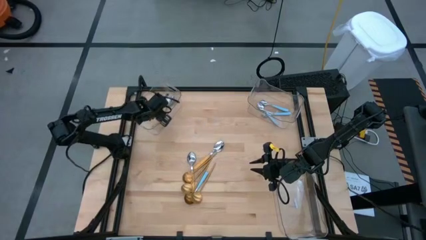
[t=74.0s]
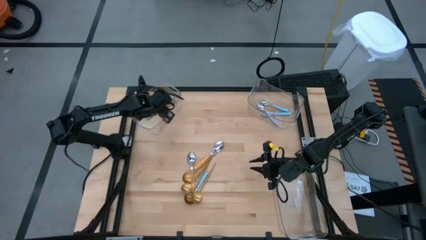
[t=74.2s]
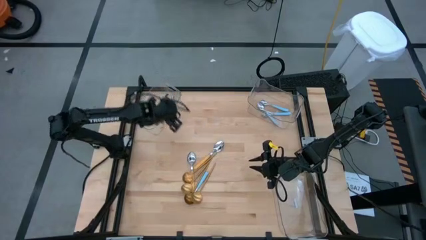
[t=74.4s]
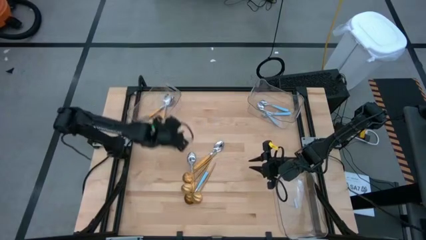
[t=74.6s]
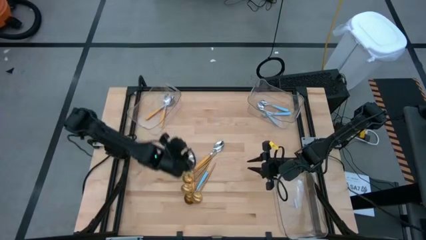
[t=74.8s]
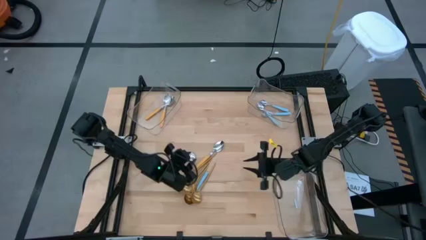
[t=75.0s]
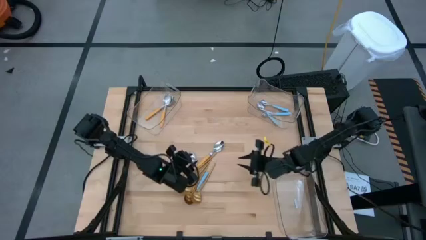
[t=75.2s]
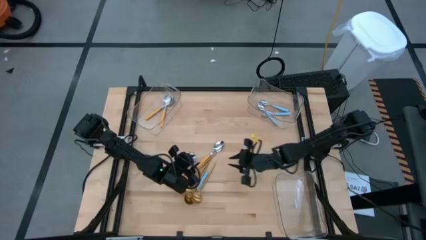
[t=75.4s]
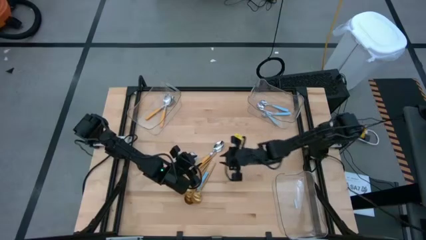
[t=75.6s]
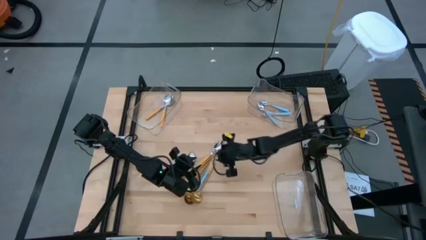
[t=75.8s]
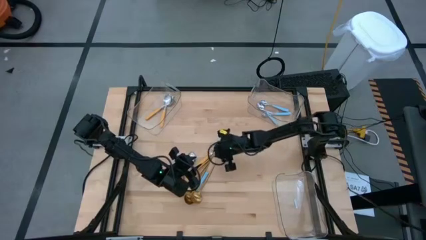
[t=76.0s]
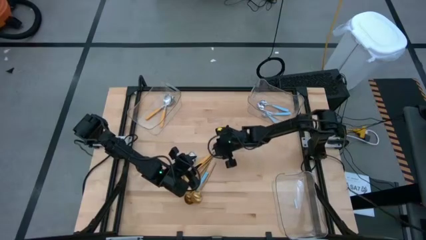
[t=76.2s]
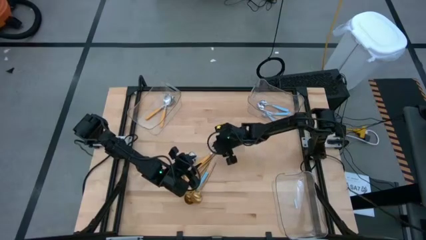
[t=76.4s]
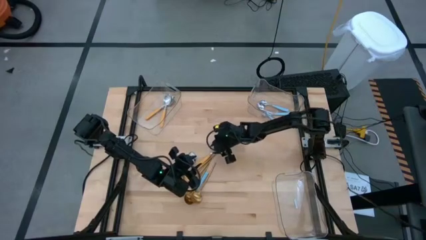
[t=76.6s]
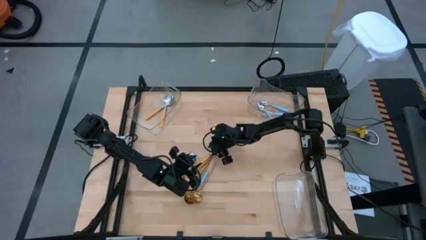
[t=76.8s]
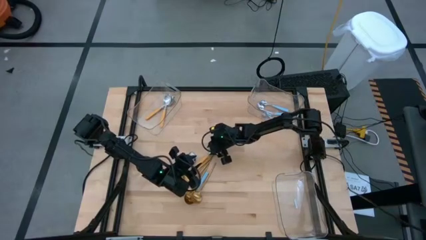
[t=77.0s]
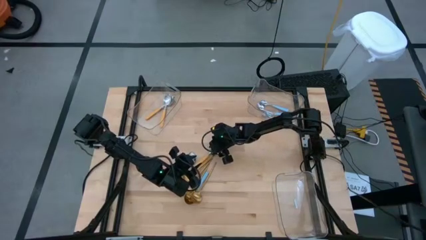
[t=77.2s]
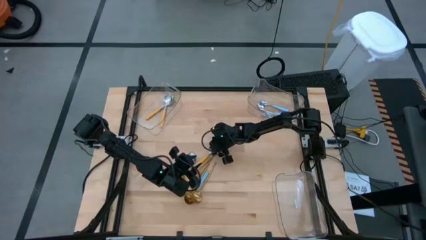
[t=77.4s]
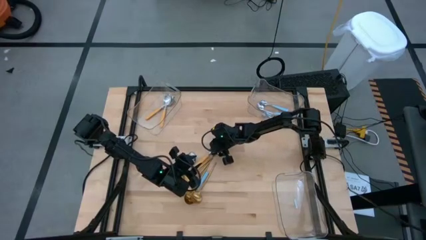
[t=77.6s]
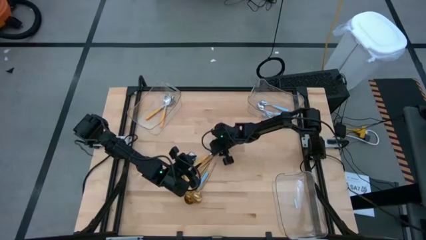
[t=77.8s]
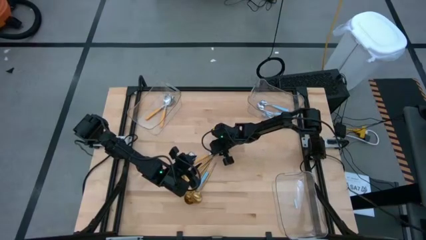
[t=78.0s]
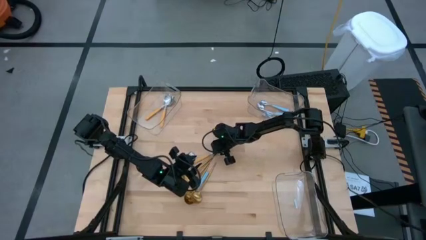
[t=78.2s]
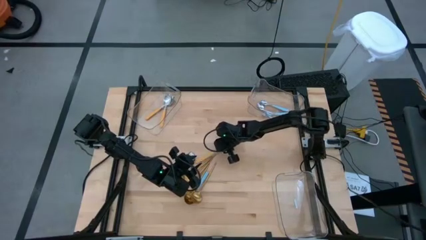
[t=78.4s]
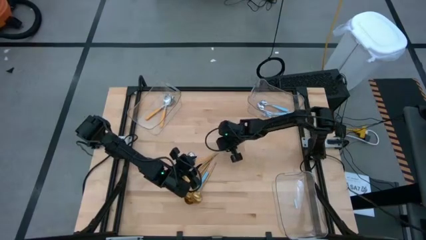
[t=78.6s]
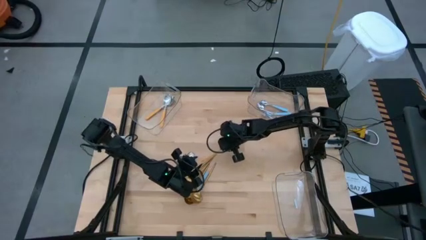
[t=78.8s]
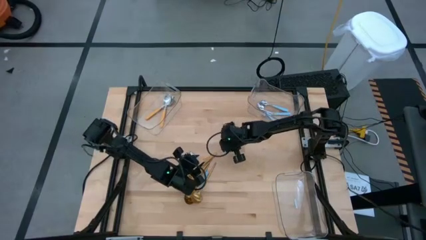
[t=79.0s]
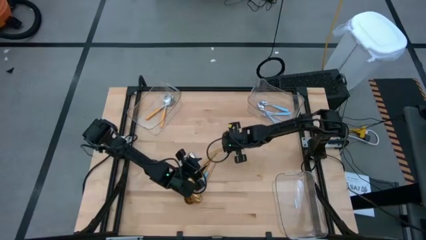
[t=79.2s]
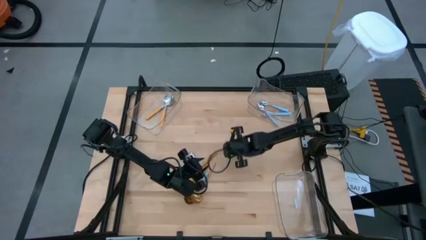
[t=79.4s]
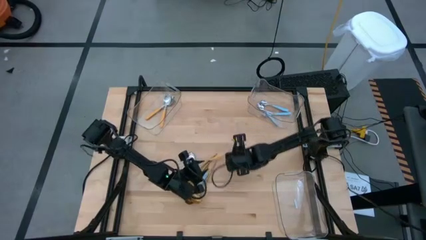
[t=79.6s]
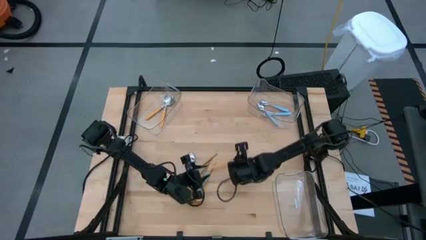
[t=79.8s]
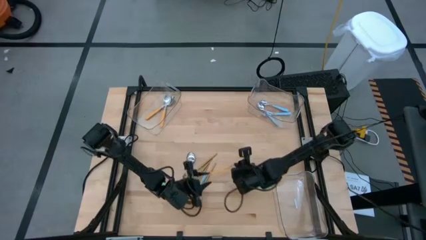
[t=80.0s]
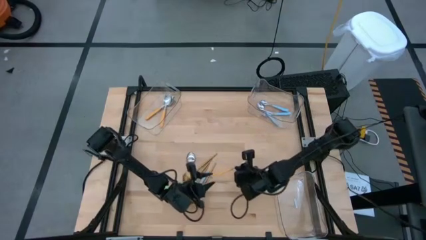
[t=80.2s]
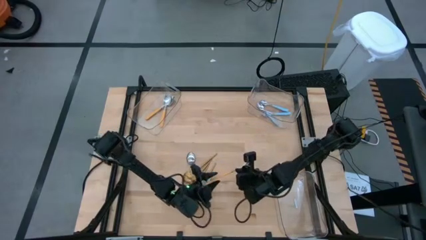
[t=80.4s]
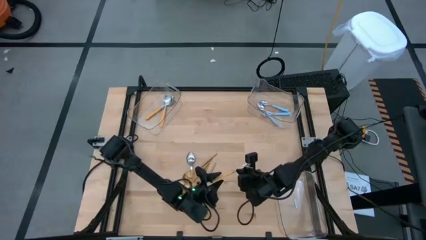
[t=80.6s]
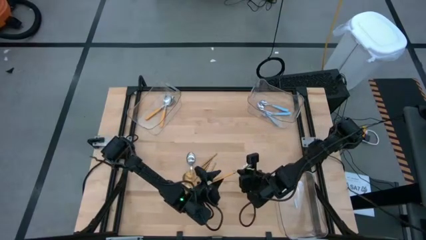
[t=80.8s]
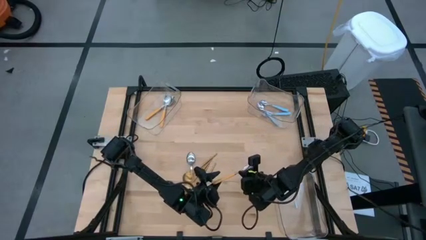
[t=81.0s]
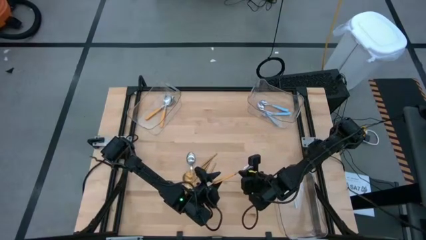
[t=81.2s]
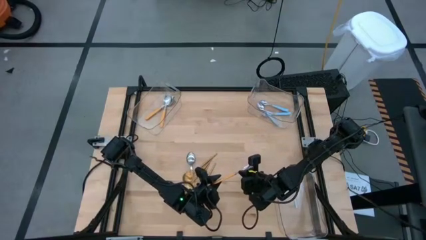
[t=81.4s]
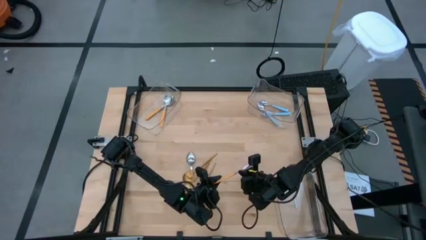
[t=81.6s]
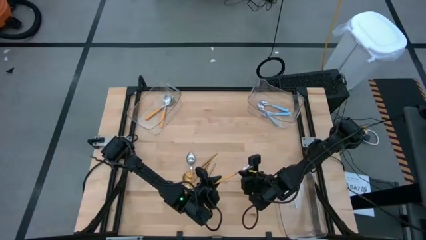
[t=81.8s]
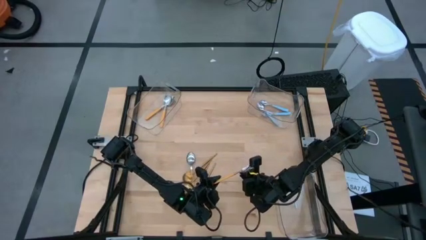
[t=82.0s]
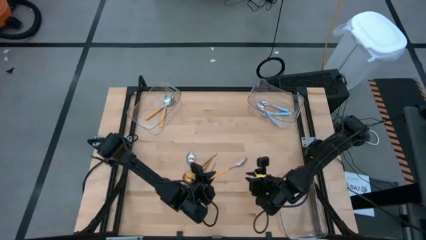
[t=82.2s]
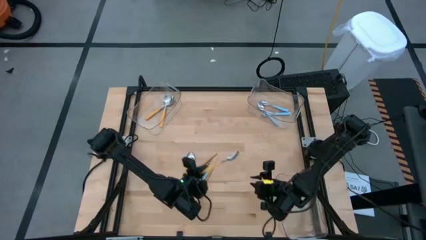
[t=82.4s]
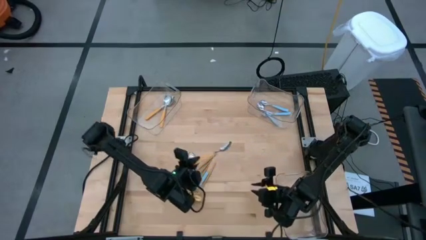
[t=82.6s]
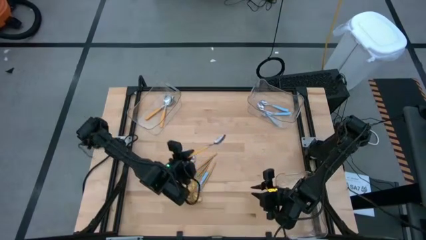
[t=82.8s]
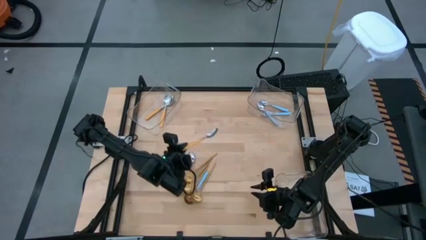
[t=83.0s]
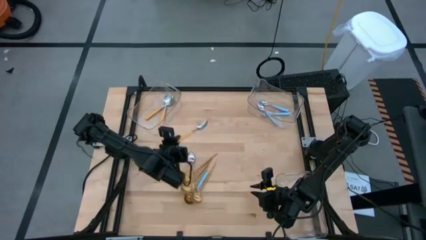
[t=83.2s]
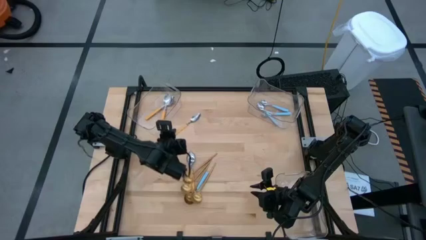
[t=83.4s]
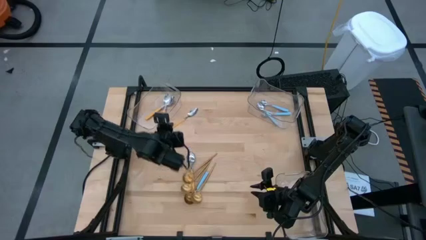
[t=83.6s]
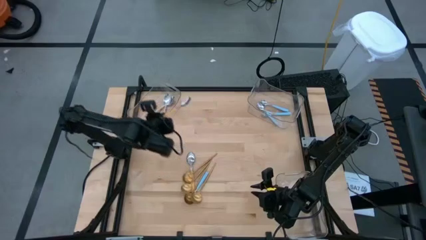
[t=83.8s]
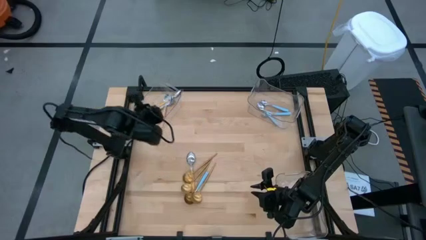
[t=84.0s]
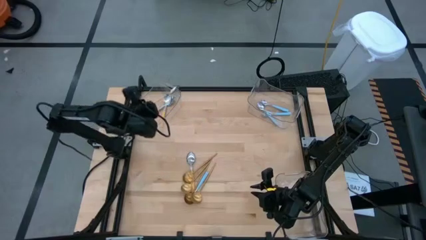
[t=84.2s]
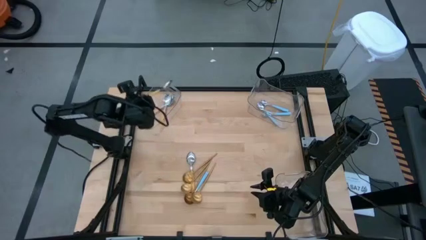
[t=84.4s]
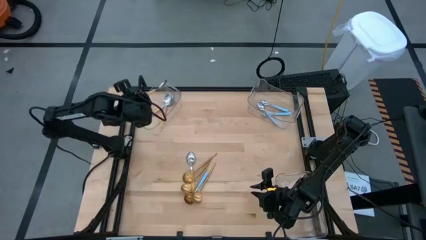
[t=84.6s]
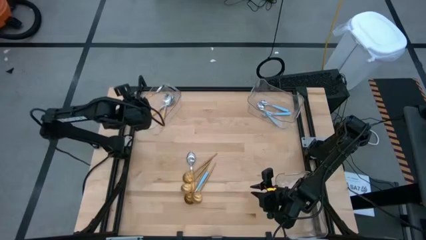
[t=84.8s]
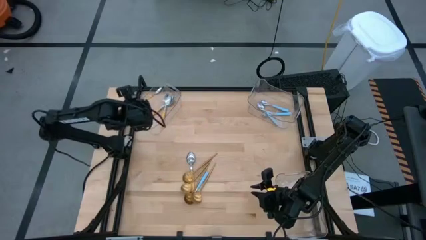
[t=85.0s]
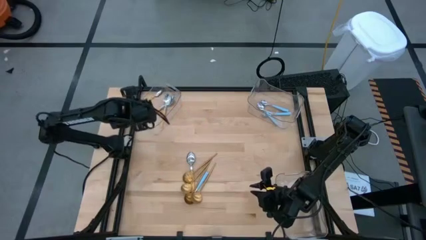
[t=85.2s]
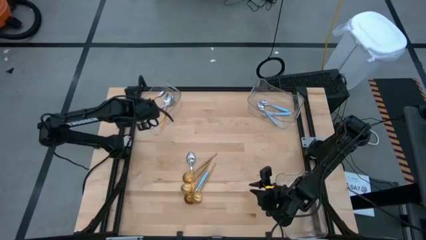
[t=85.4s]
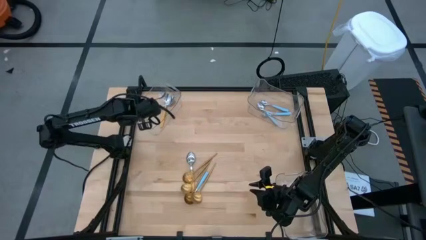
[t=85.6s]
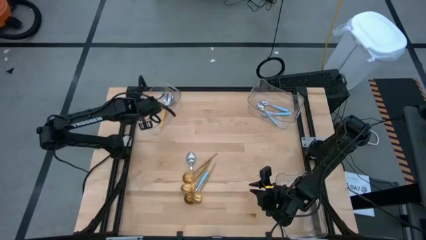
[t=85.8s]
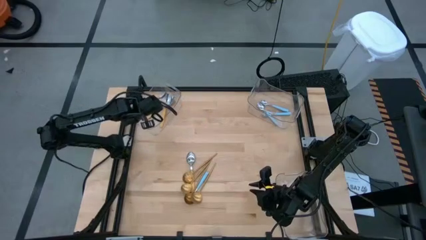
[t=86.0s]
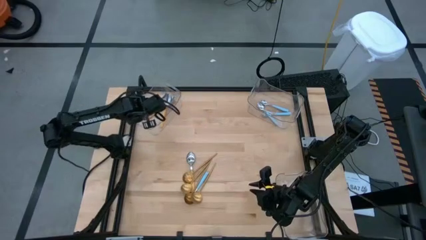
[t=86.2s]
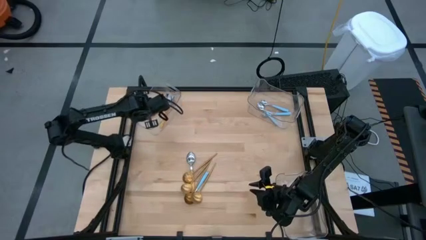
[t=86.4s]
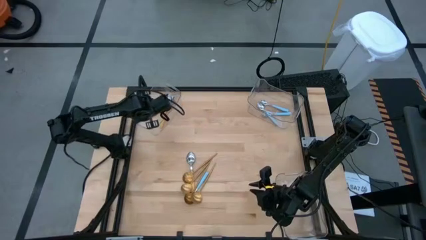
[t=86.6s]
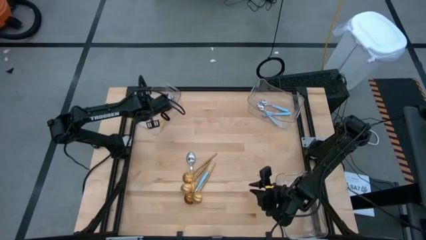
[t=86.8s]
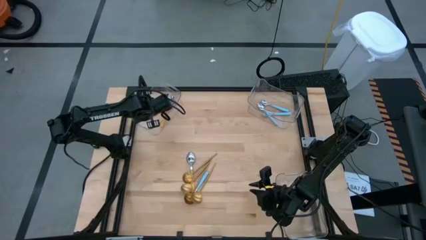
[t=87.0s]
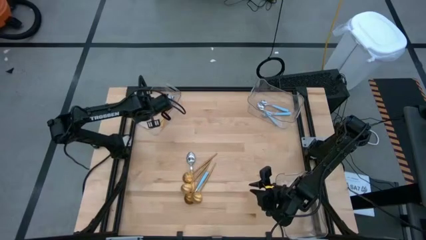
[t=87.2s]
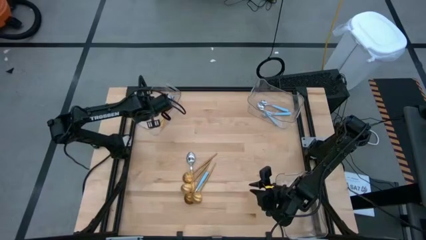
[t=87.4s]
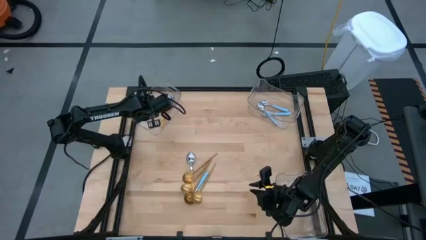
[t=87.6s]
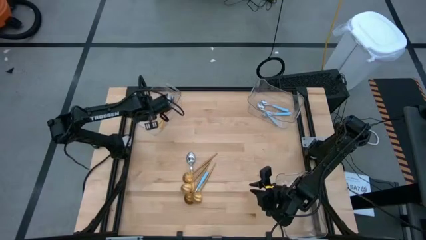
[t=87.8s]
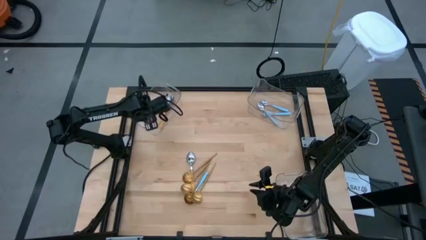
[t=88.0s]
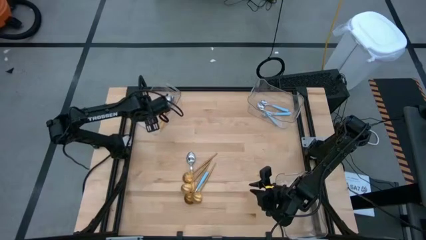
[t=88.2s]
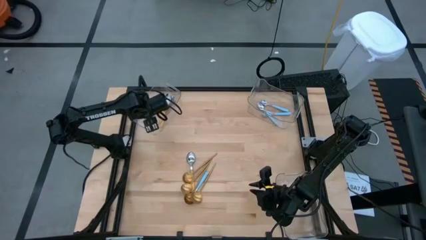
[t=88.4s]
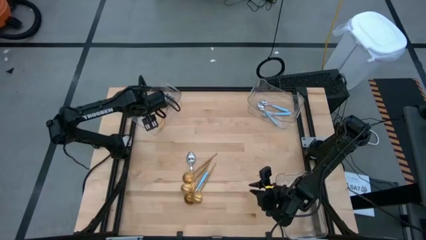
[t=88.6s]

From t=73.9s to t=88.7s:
Task: Sort silverware by color (type)
Put the yellow spoon into the top left transparent bin

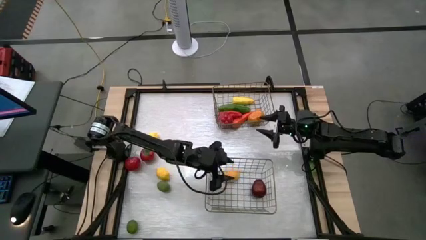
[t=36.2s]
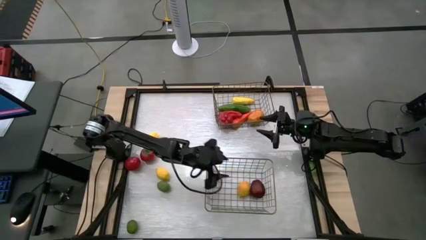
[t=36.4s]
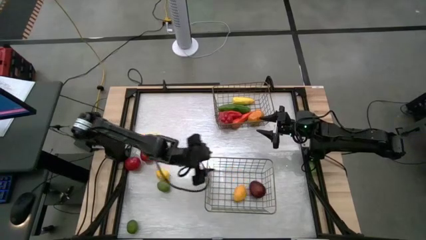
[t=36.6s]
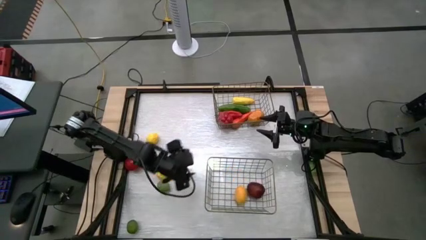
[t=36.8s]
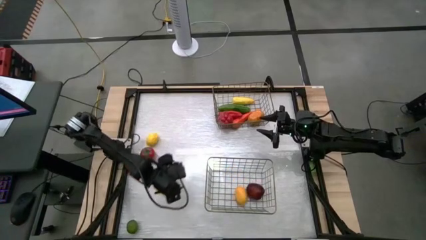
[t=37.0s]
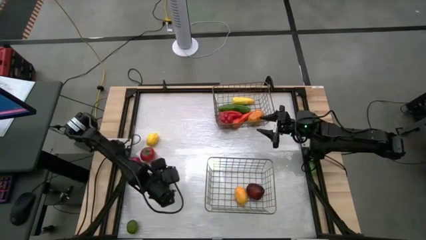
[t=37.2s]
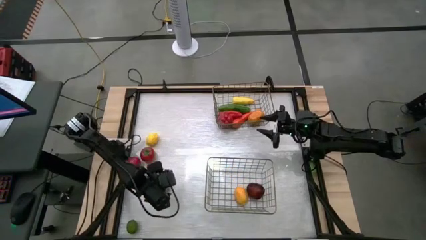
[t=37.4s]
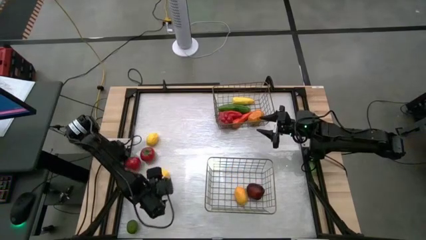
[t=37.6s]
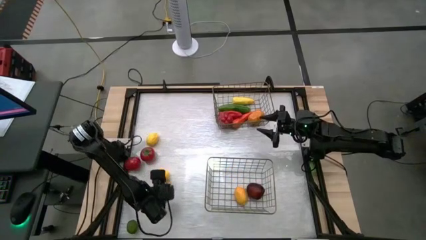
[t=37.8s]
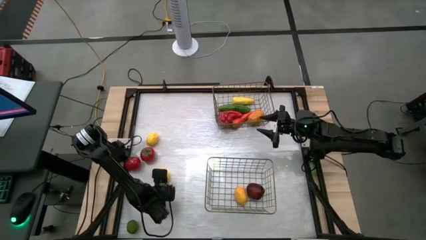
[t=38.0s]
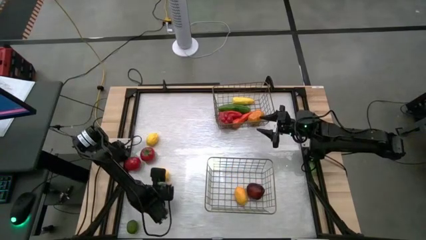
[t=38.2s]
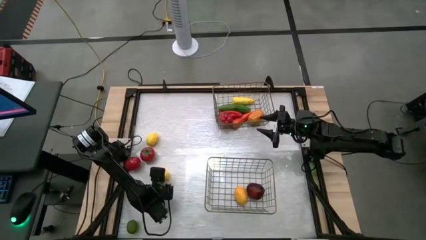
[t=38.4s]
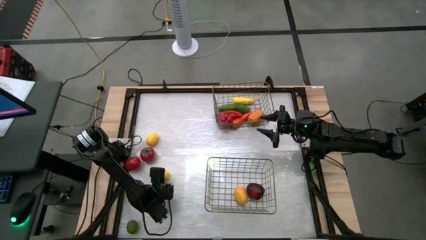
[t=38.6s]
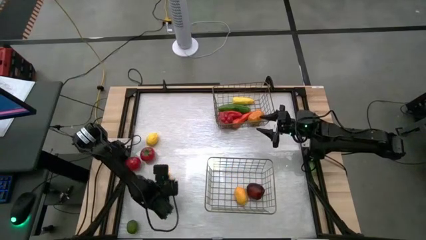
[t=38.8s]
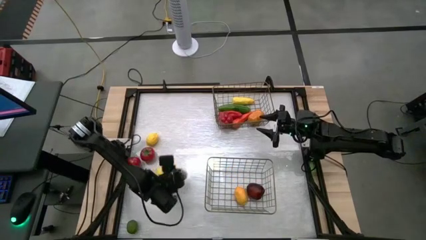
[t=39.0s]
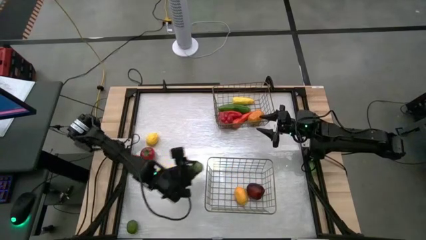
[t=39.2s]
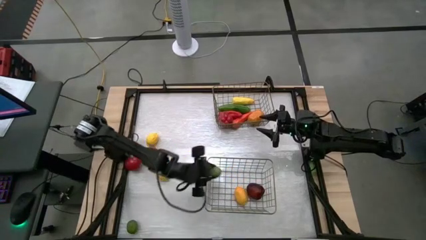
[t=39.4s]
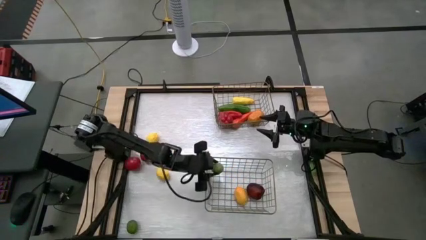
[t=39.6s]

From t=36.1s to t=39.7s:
Task: Sort produce into baskets
Put the top green lime into the bottom wire basket
